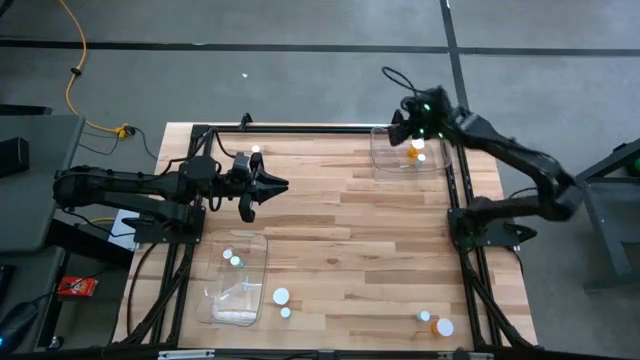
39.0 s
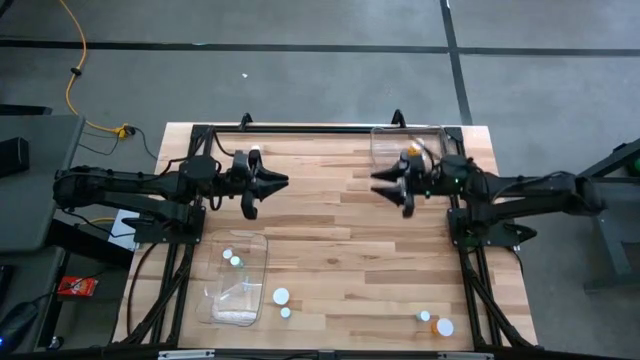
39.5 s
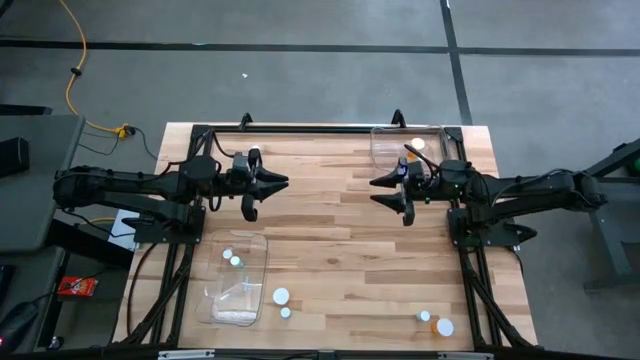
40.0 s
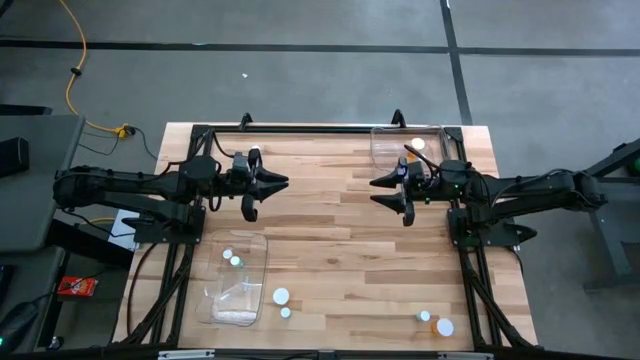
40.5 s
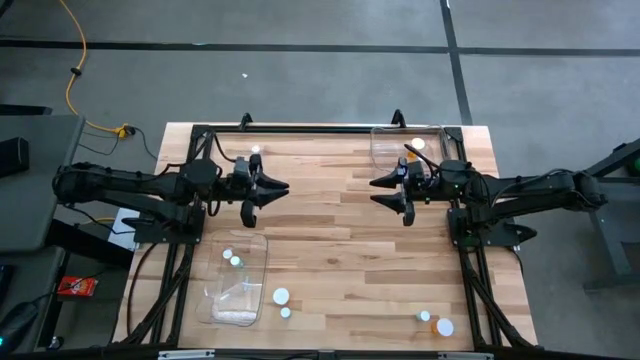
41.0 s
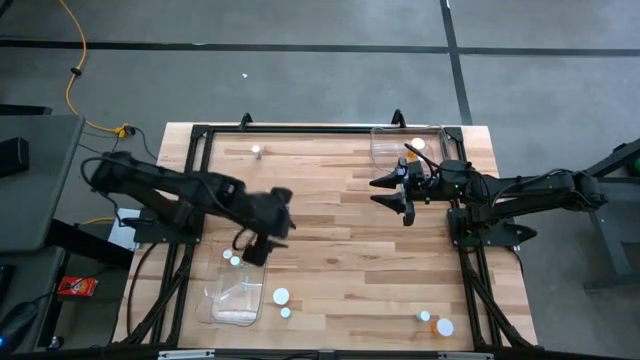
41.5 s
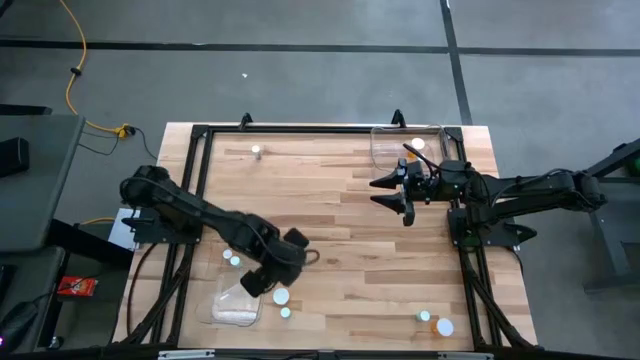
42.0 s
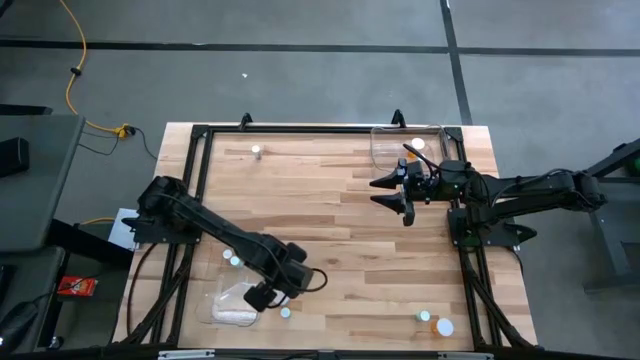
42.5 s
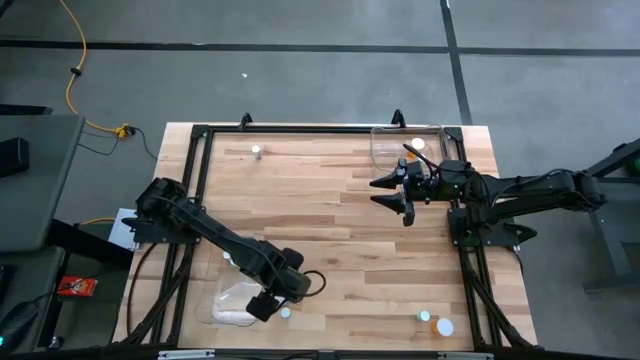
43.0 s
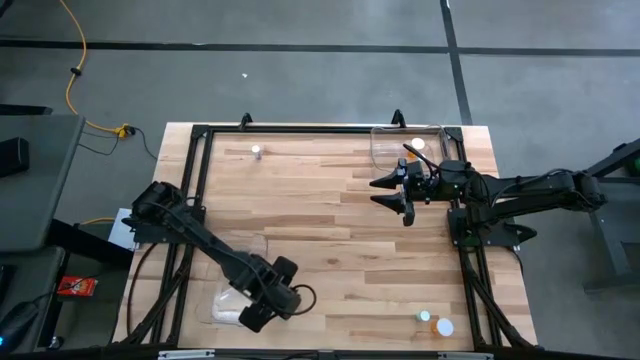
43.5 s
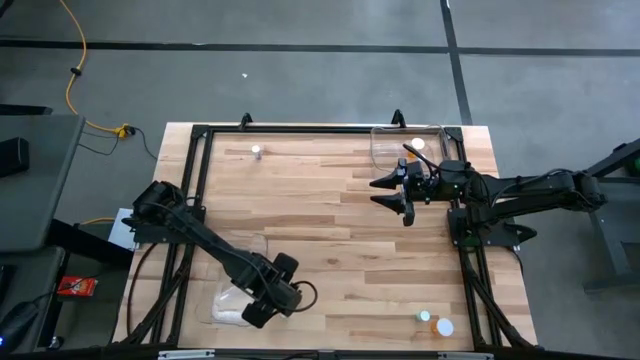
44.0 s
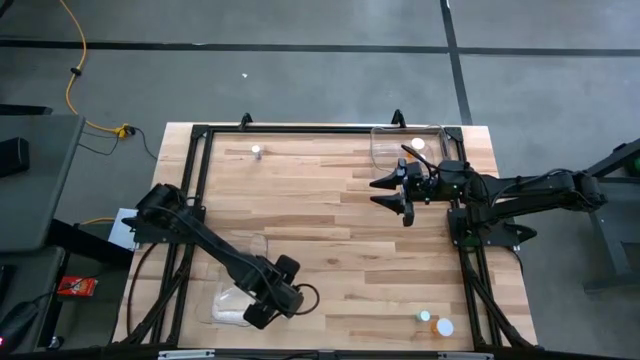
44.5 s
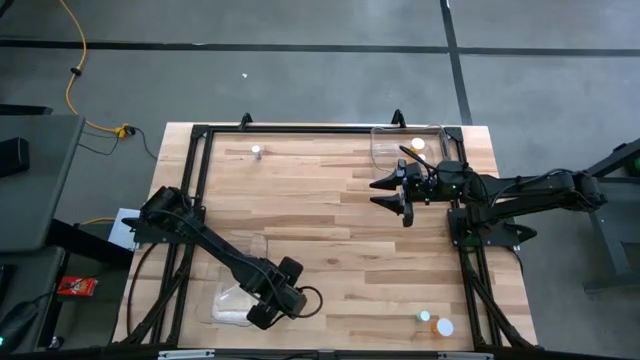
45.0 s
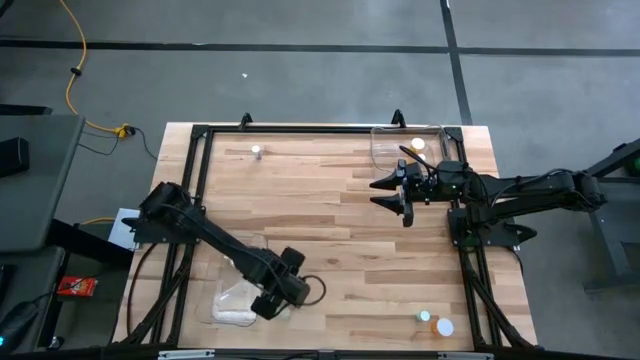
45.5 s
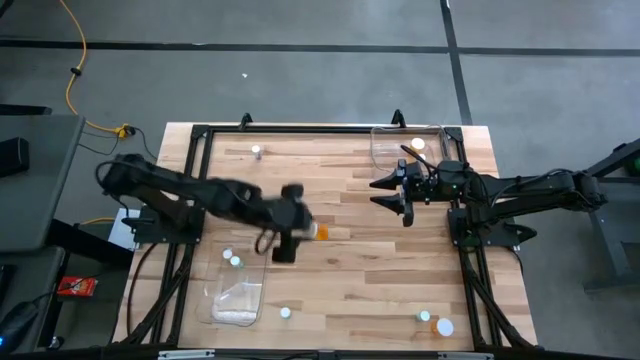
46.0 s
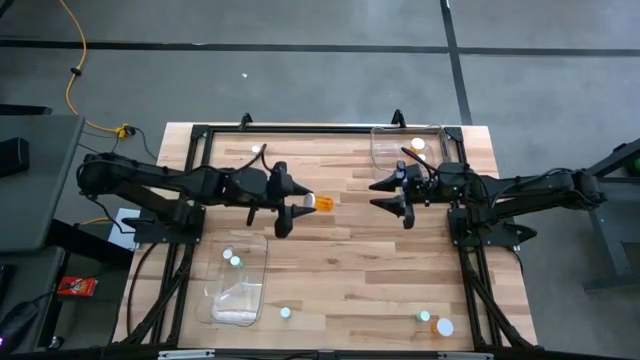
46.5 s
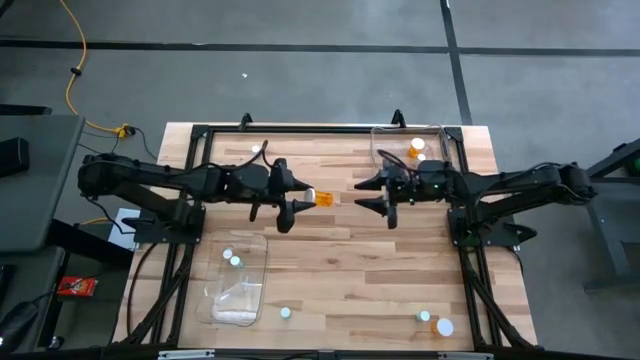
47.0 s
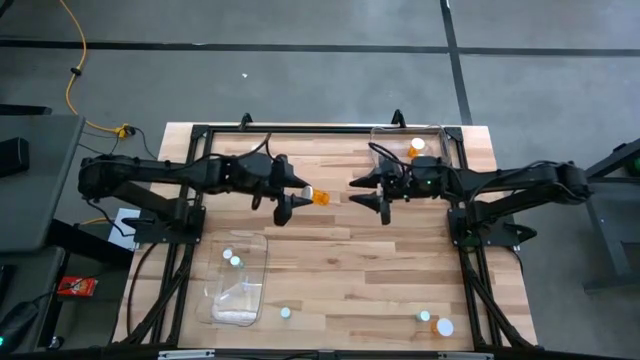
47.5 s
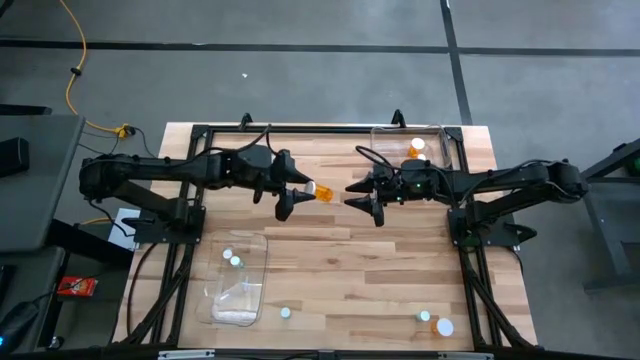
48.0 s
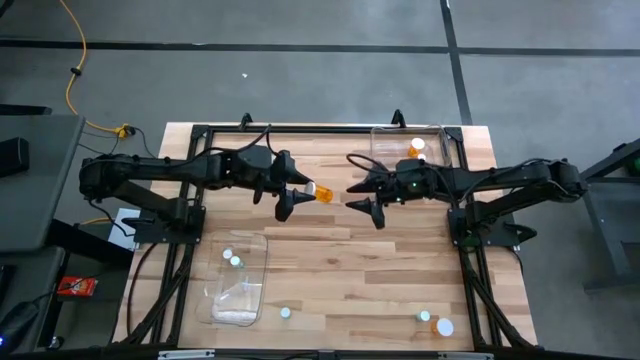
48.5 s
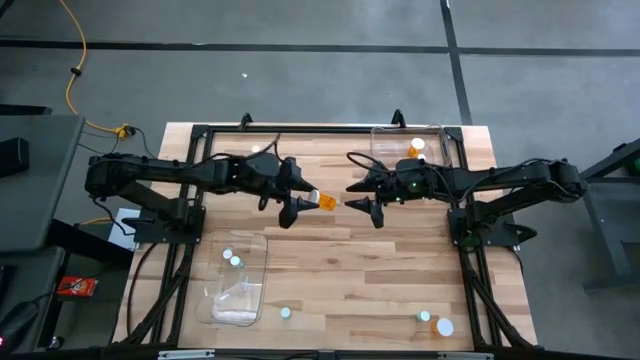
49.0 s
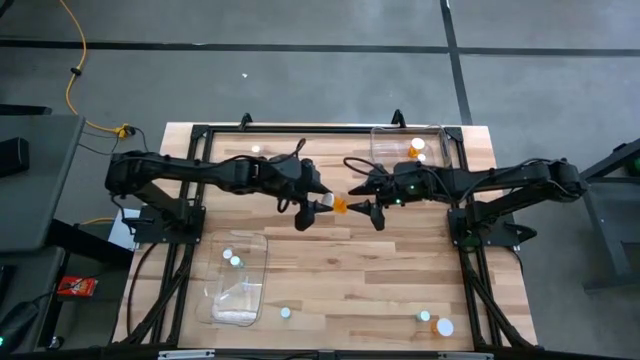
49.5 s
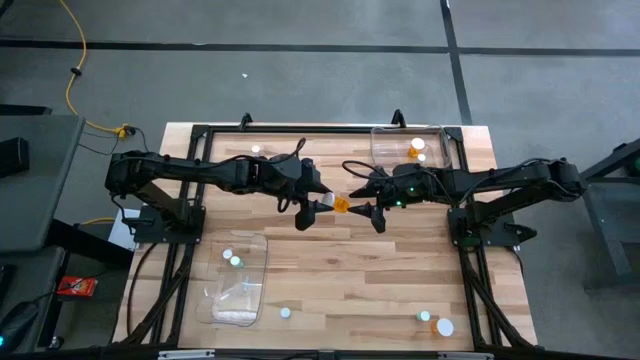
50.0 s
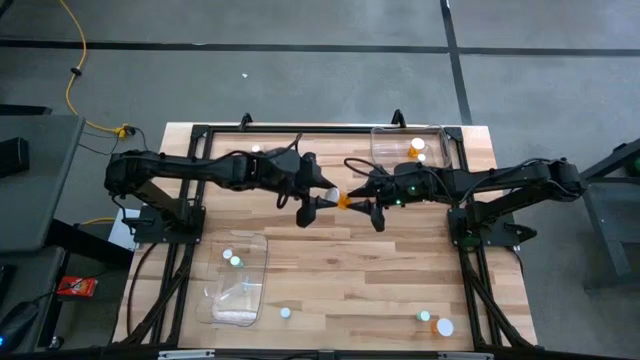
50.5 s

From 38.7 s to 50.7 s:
Task: Pick and place medicine bottles into bin by pill shape (circle, oval)
Put the large orange capsule bottle into the top transparent bin

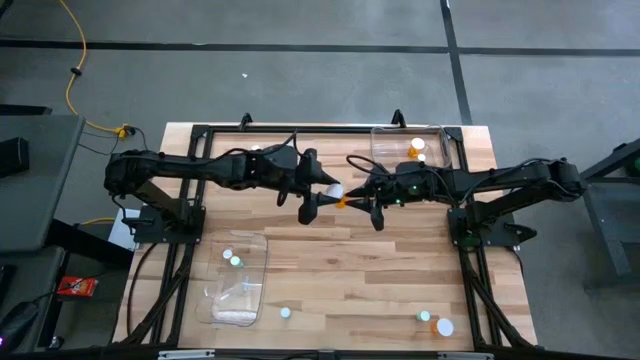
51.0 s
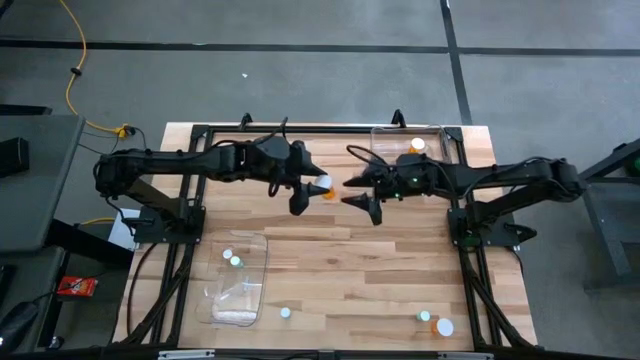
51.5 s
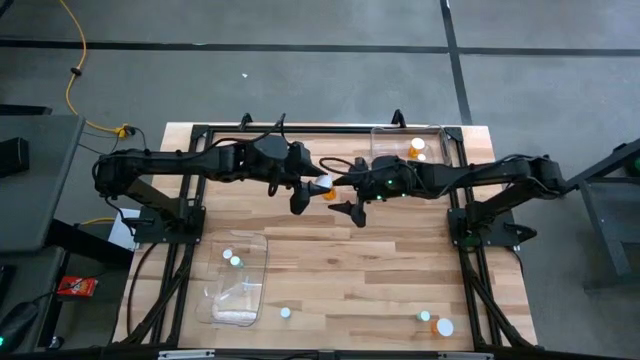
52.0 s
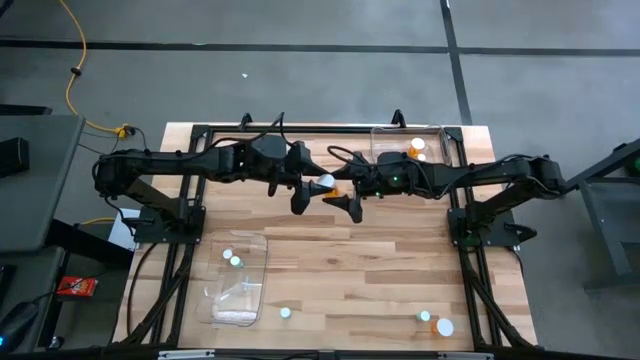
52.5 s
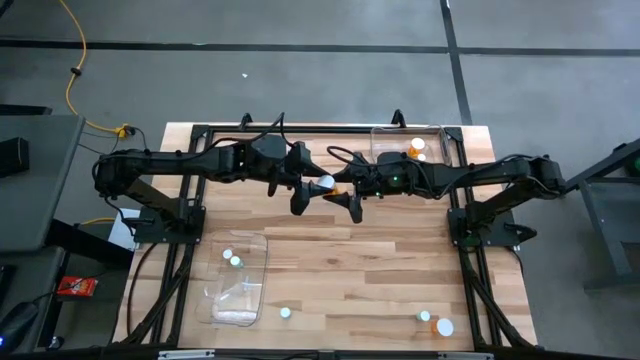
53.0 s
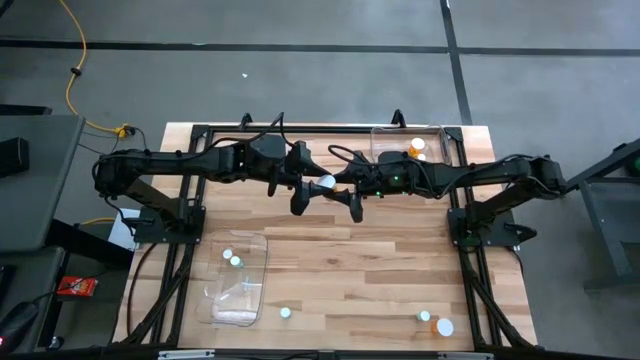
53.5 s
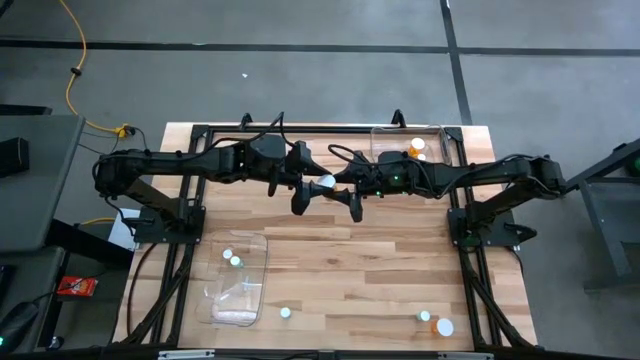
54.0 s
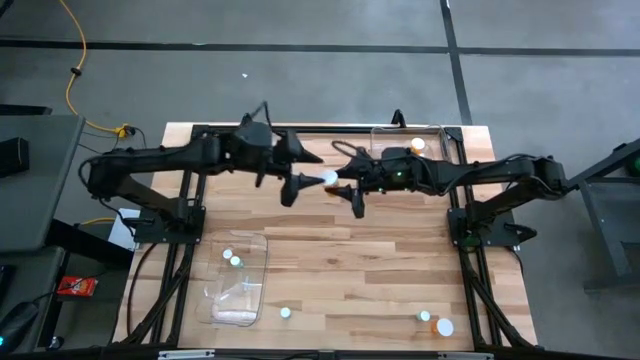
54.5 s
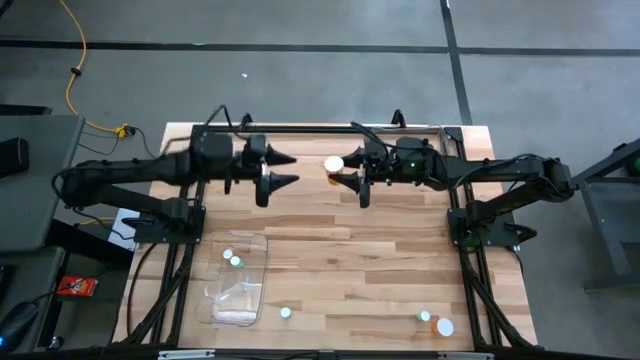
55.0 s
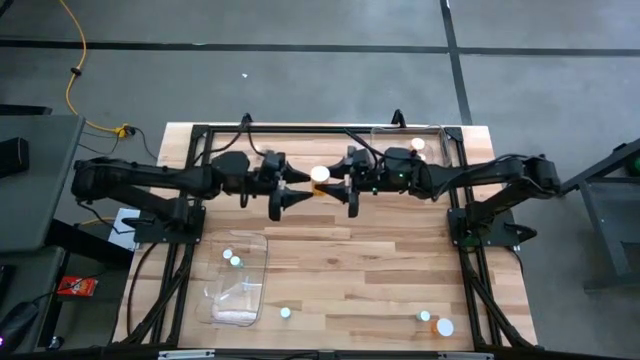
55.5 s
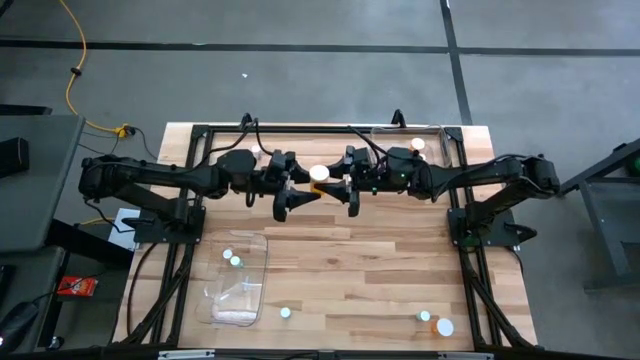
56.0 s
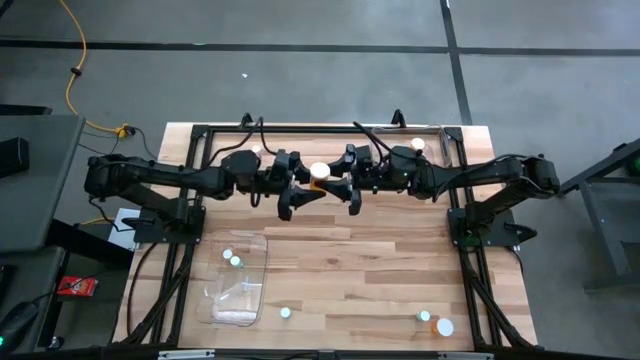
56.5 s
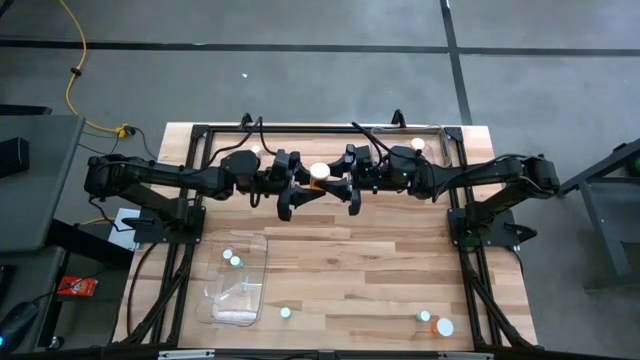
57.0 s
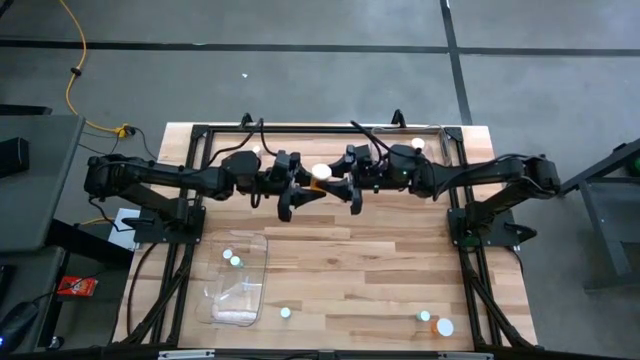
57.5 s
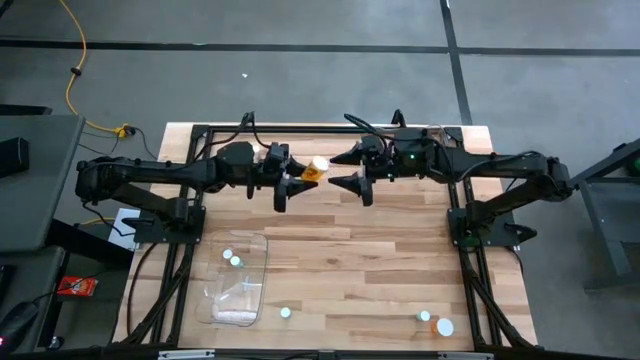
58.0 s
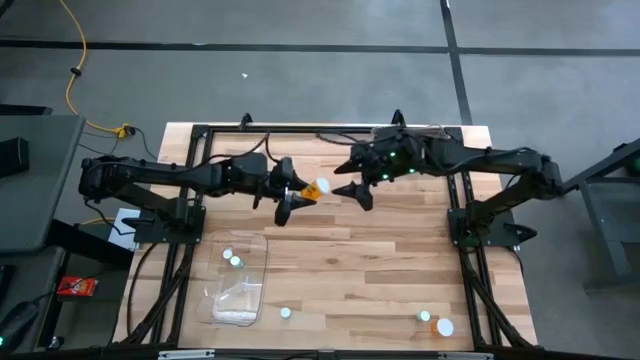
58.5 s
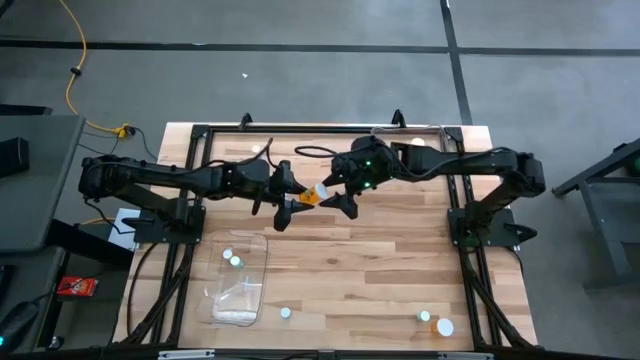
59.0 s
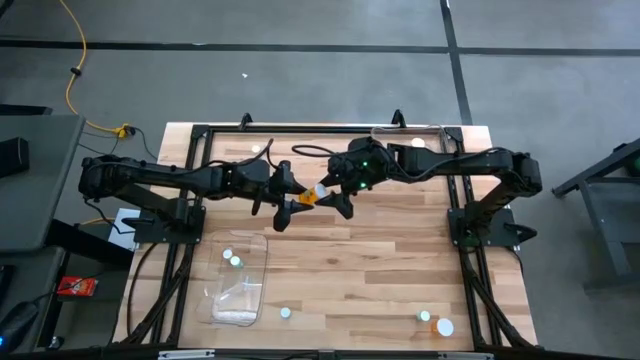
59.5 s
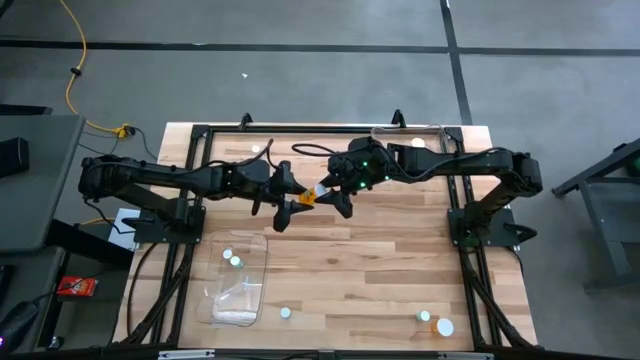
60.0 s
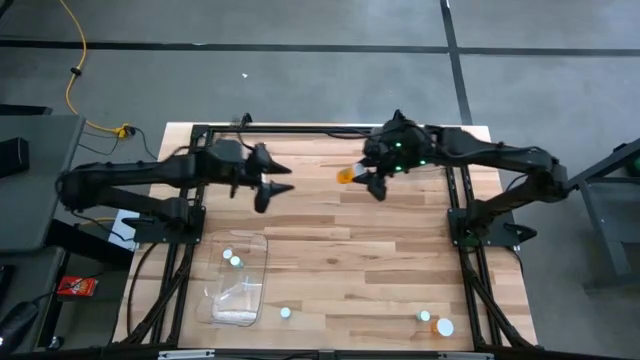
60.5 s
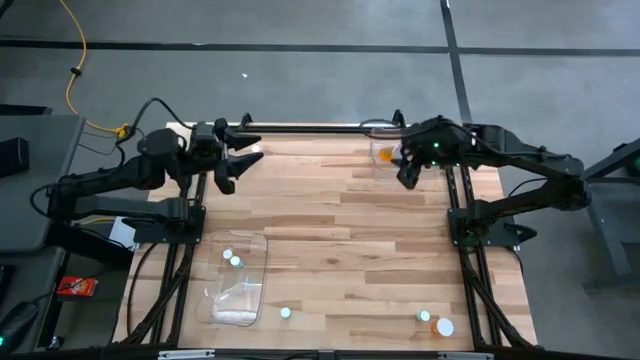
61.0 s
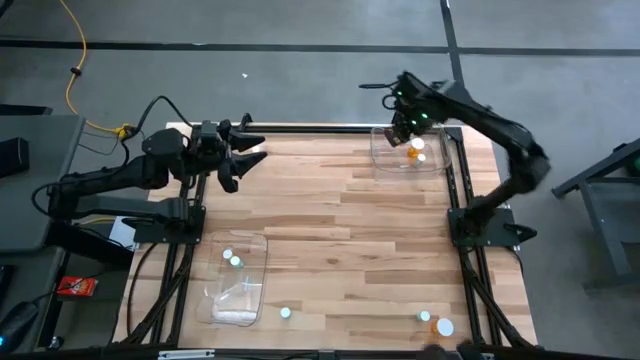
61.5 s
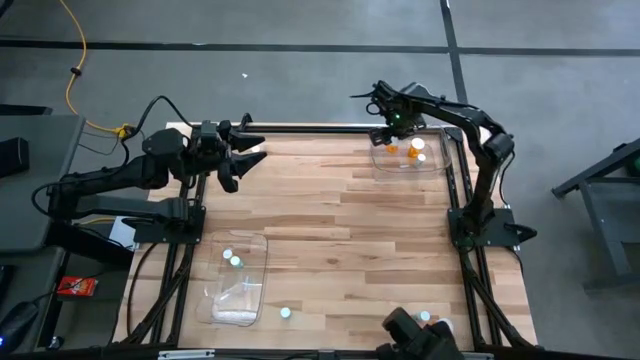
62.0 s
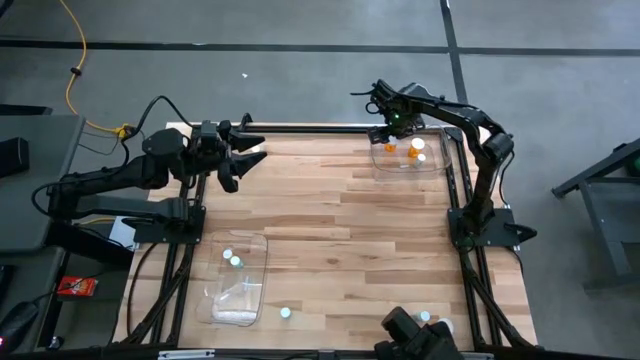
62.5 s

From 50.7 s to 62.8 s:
Put the large orange capsule bottle into the top transparent bin
